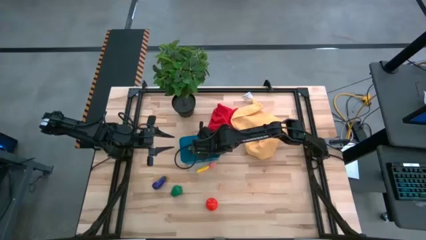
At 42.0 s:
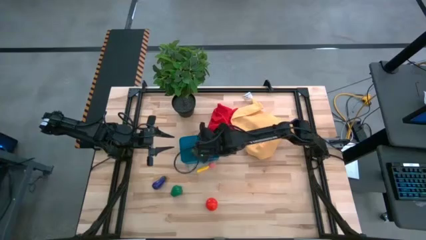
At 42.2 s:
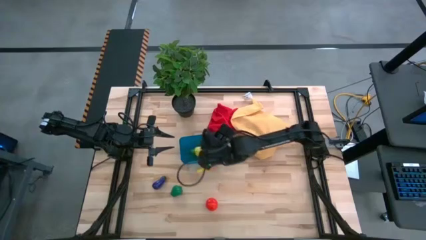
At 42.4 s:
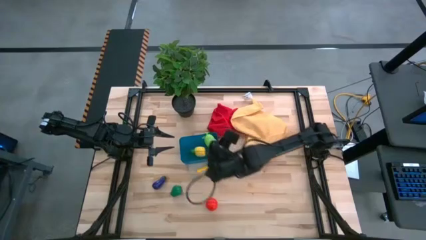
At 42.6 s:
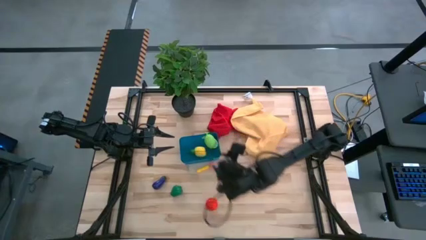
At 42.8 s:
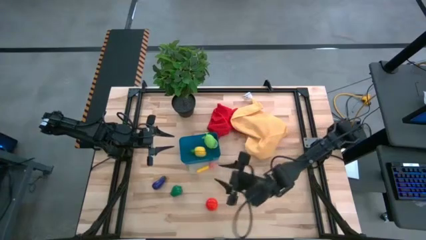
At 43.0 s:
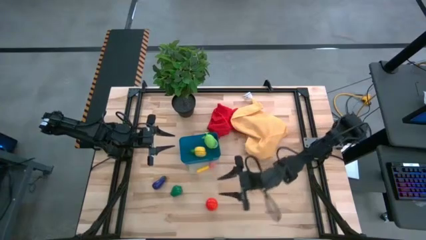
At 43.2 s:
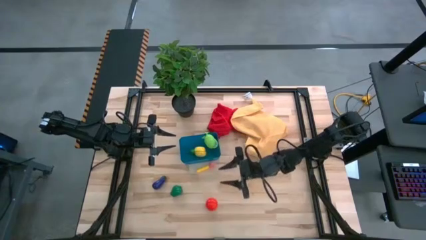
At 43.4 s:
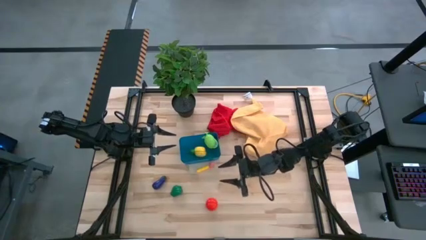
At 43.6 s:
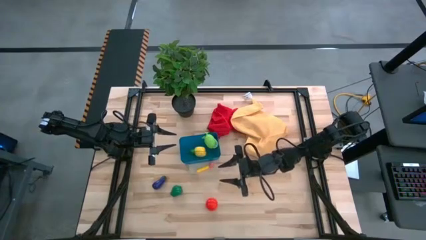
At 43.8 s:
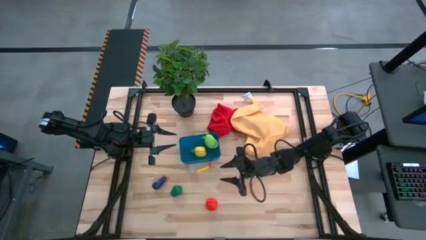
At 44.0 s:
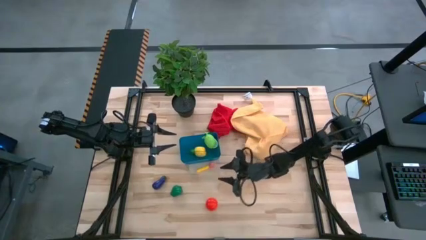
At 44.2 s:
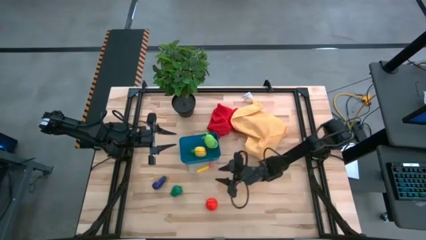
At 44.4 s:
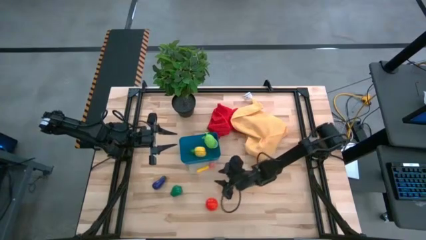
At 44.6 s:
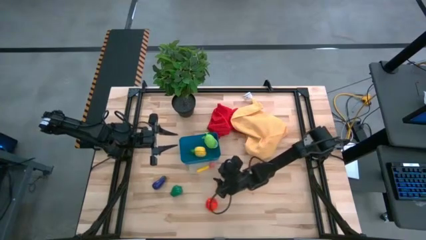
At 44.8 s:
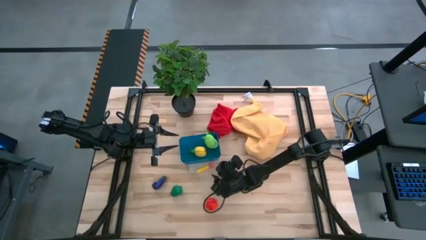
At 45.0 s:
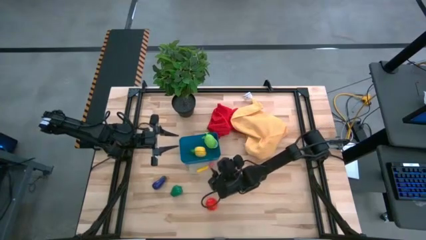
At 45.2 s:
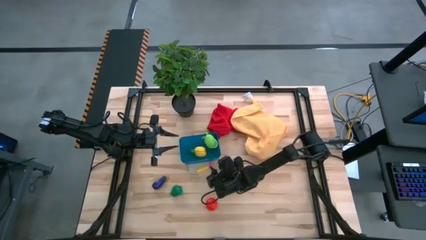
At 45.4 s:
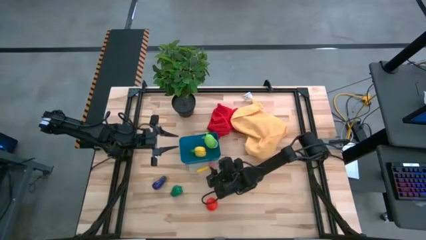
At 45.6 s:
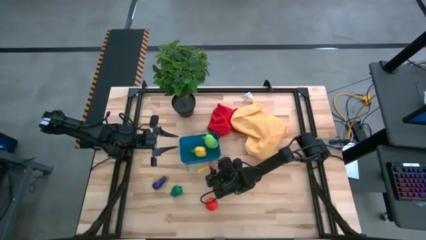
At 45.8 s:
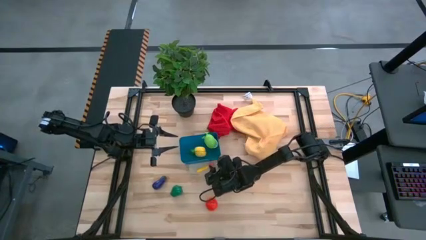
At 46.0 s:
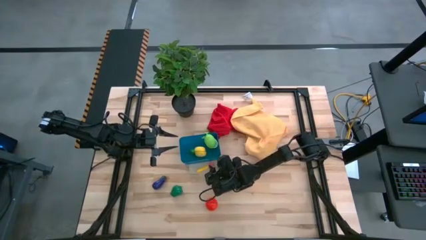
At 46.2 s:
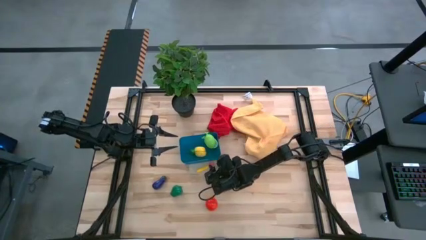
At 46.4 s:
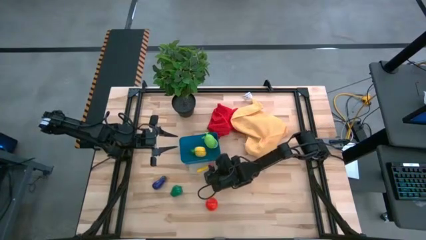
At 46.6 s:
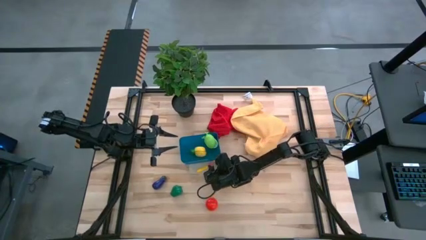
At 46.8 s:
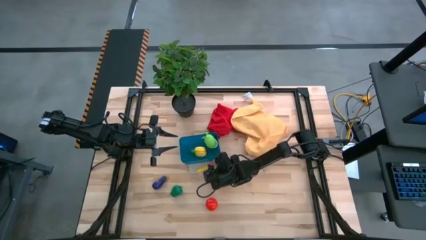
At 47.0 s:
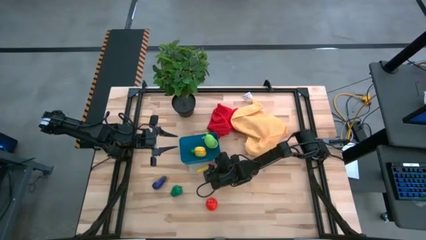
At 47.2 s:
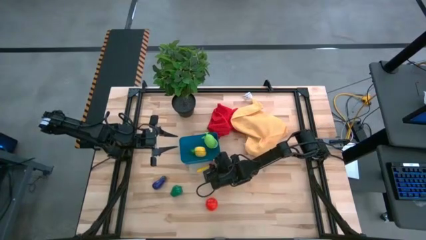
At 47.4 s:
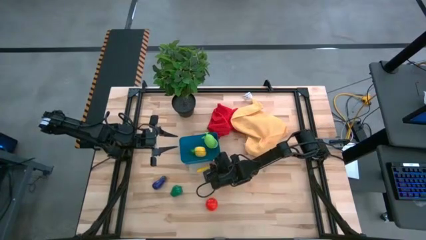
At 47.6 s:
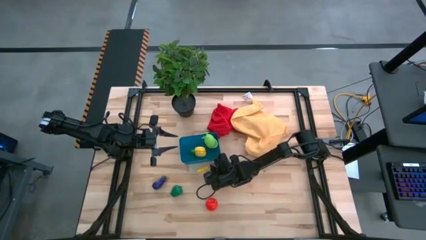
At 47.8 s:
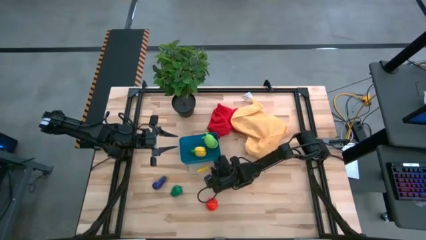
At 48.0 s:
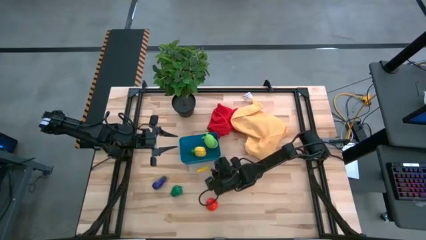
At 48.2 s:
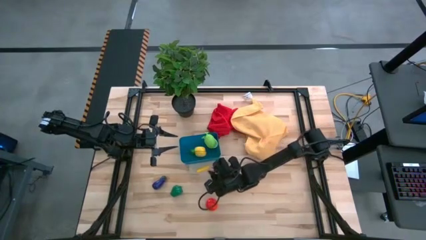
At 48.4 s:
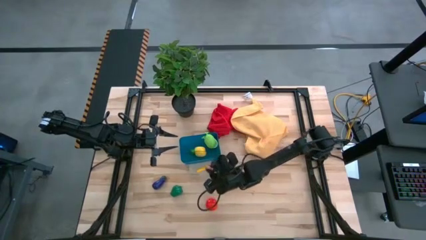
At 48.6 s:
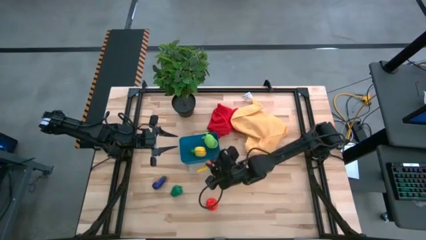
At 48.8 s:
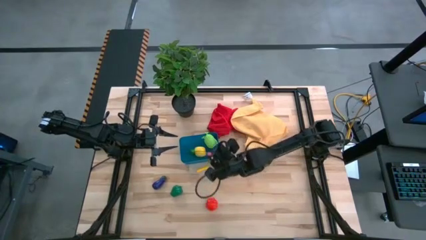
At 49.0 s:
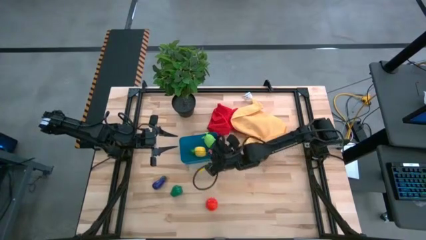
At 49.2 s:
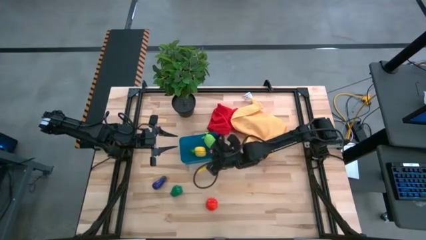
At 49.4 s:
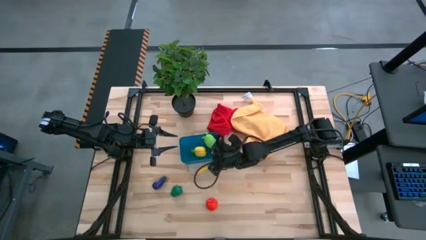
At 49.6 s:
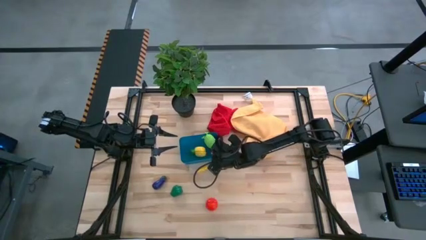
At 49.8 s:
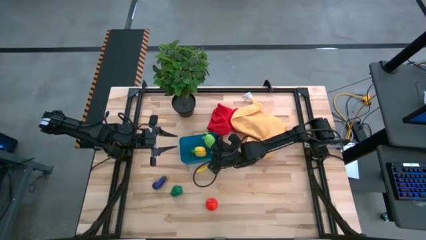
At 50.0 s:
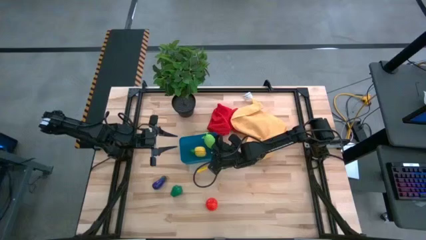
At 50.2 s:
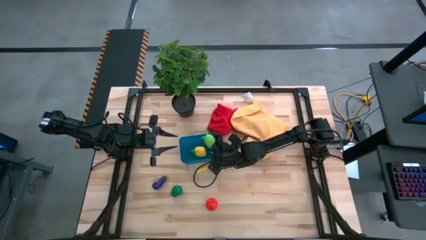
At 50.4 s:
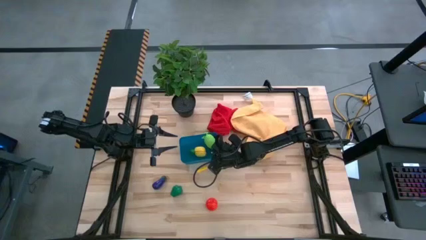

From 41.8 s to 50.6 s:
Task: Pick and placing Produce into tupperware
Put the pink peach into the blue bin

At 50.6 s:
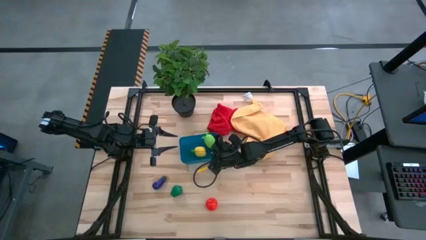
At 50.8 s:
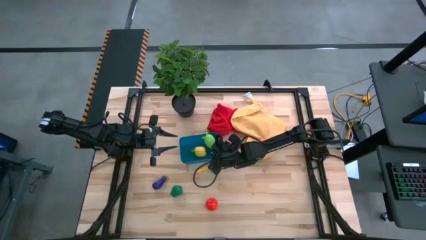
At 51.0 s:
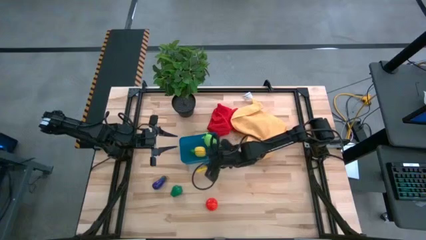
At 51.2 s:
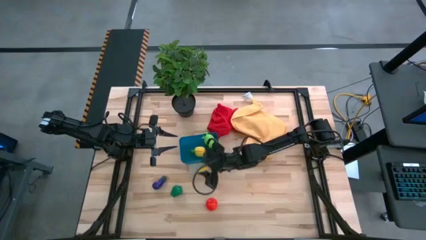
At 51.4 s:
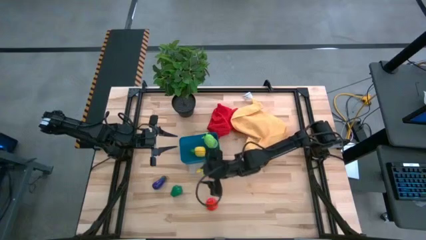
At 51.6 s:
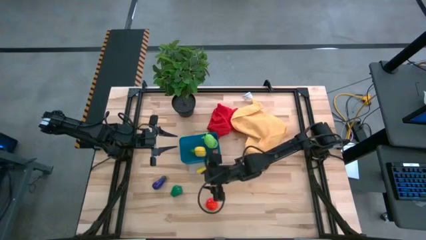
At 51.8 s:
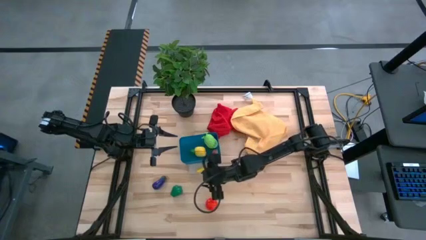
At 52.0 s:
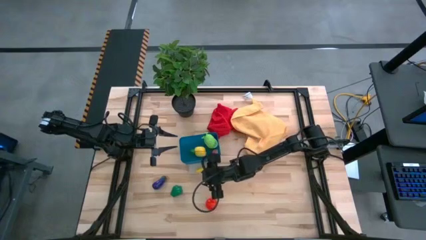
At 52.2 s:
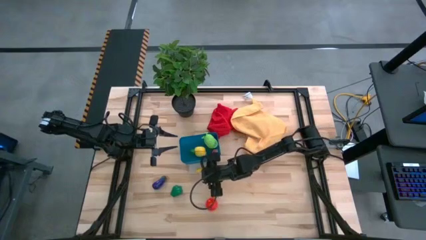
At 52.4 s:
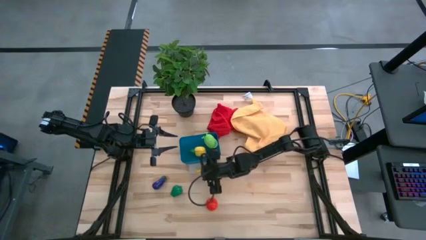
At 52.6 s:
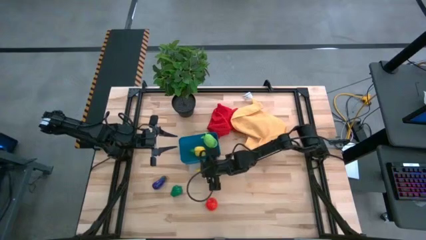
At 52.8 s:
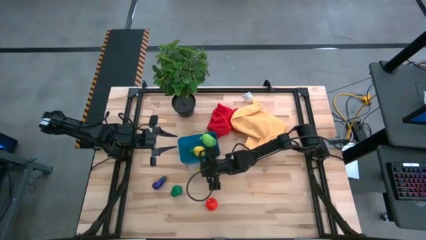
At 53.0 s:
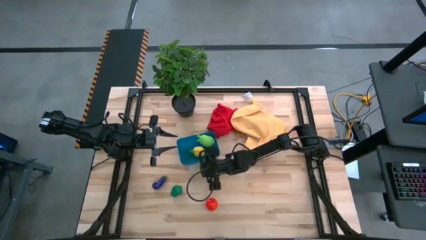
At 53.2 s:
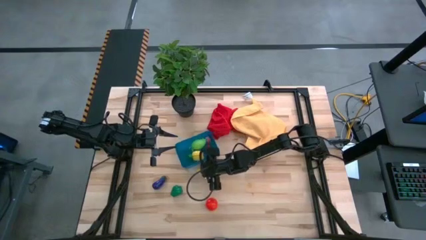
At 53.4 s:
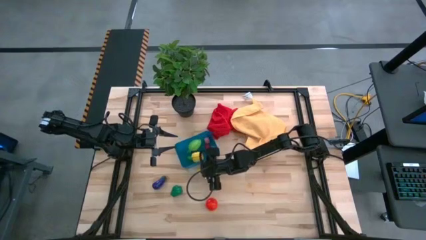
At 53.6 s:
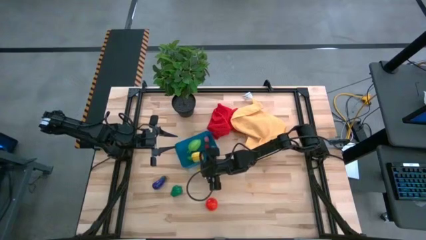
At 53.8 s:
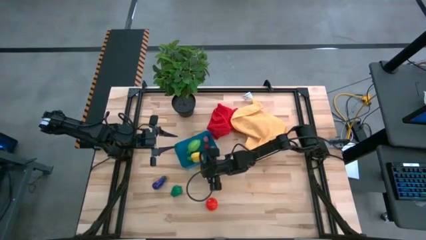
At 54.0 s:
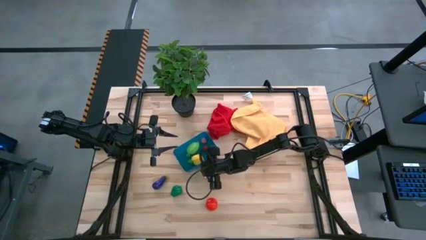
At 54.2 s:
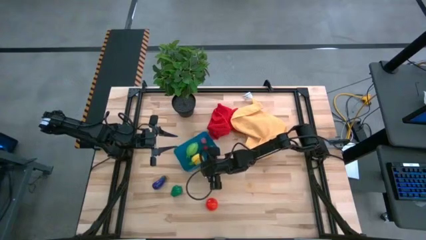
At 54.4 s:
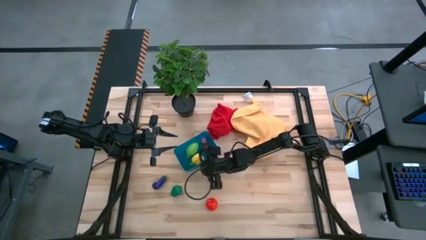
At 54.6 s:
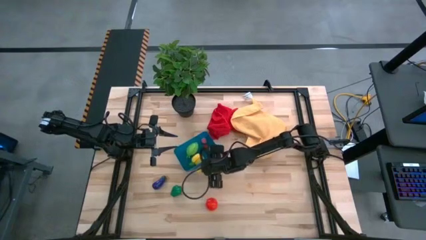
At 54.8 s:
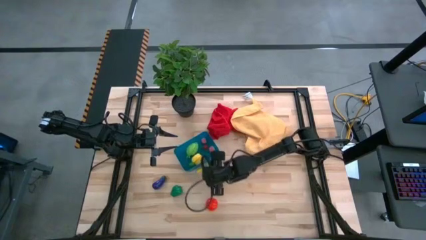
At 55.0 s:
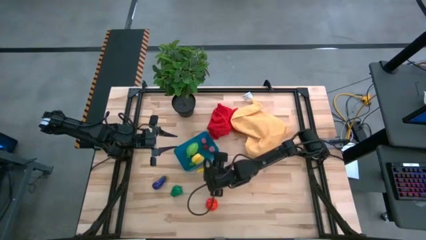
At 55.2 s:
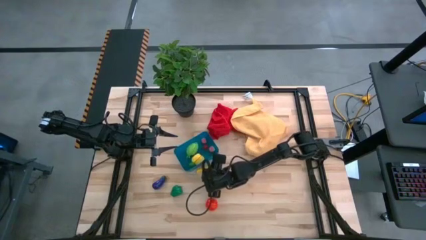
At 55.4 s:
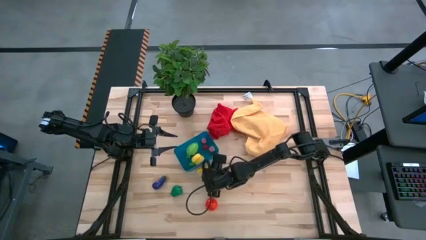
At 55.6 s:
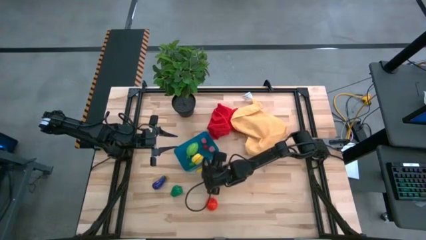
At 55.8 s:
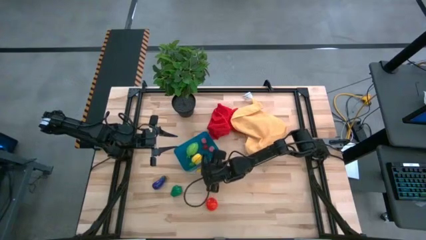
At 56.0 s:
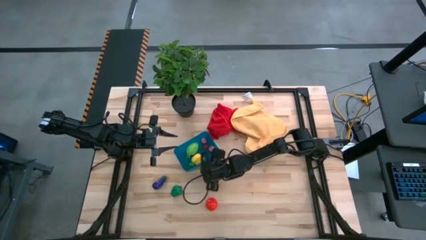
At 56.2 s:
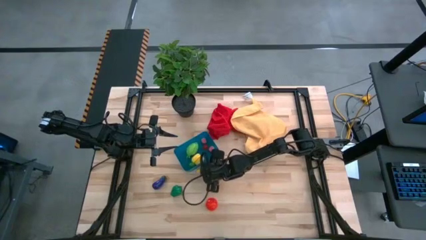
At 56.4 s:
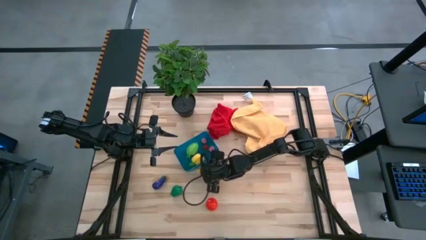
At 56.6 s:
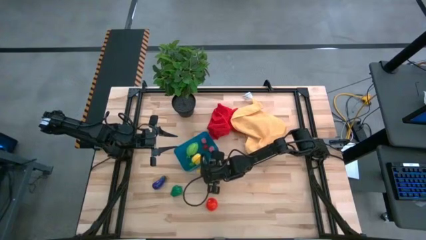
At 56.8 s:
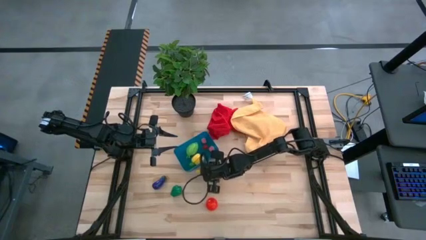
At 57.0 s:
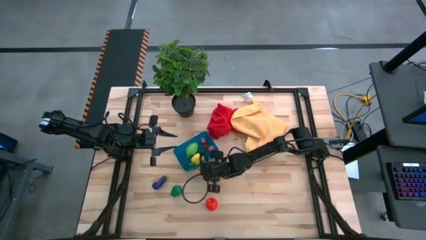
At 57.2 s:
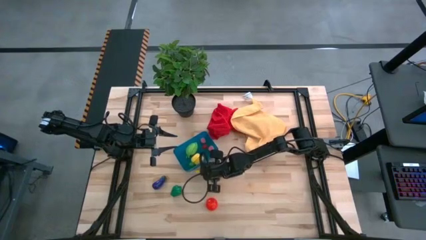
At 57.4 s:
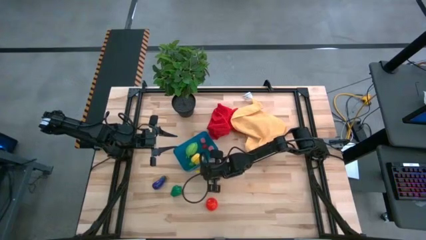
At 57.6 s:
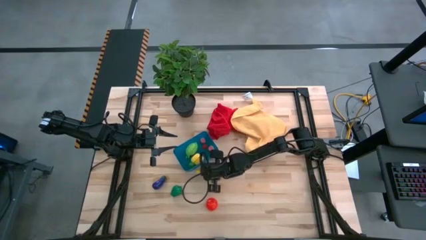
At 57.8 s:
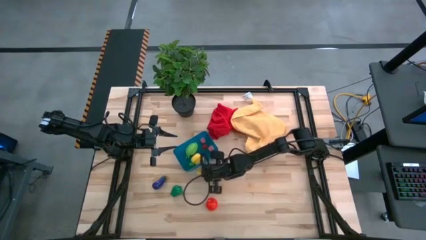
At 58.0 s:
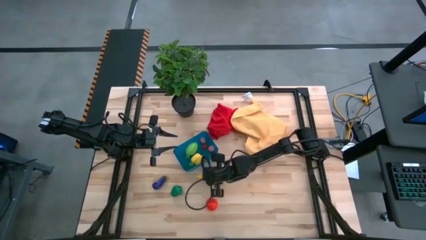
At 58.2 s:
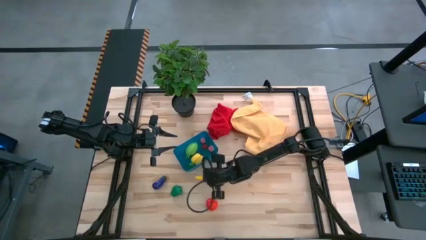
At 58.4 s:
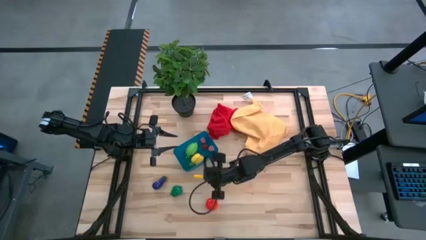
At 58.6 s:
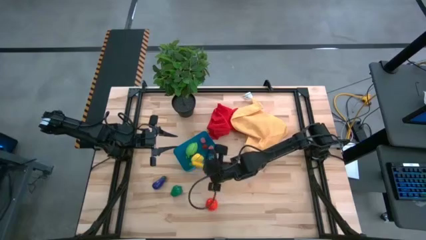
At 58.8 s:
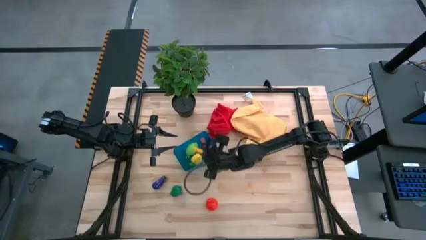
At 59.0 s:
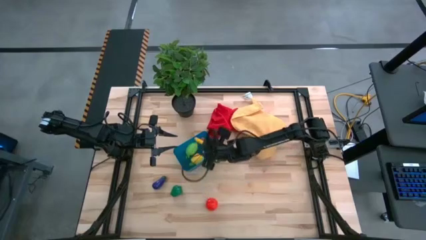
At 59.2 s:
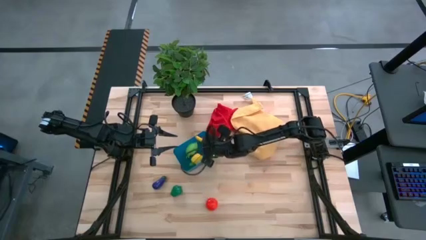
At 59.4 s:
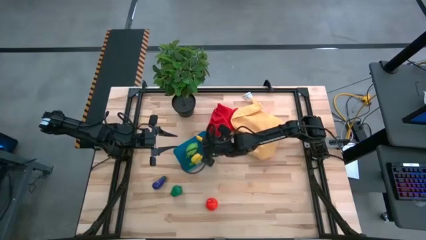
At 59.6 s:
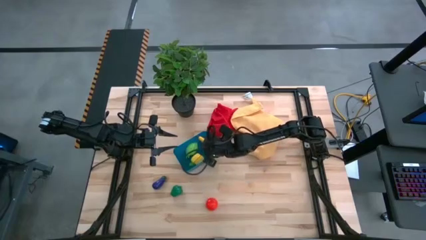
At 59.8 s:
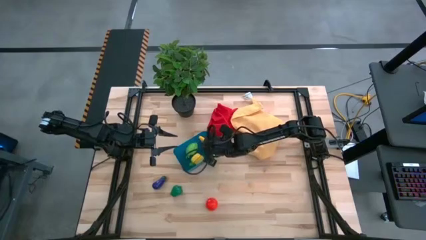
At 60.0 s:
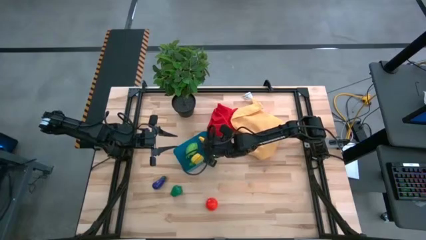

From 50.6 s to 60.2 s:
Put the yellow corn into the blue bin
